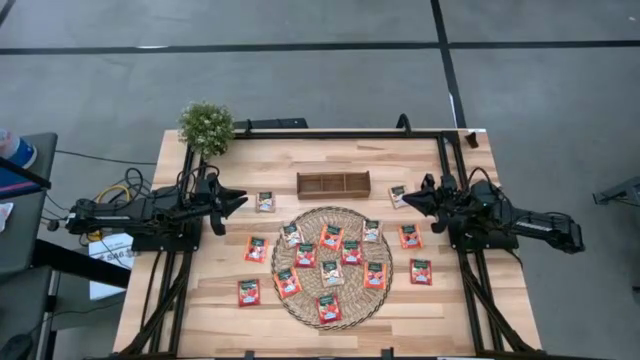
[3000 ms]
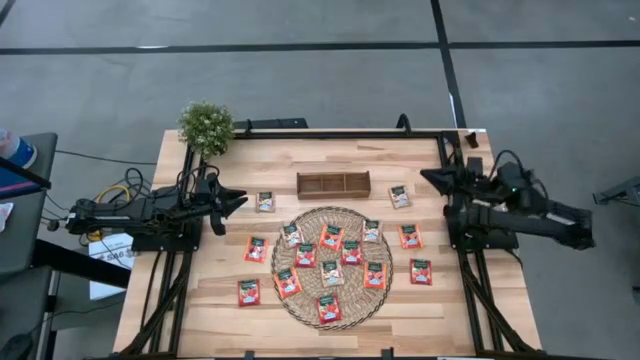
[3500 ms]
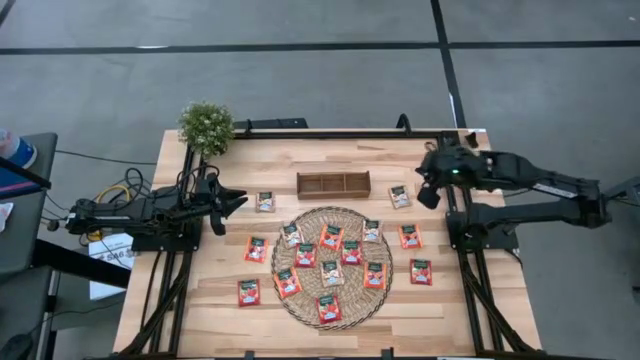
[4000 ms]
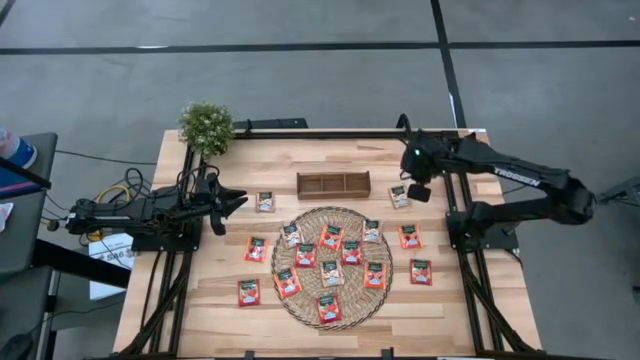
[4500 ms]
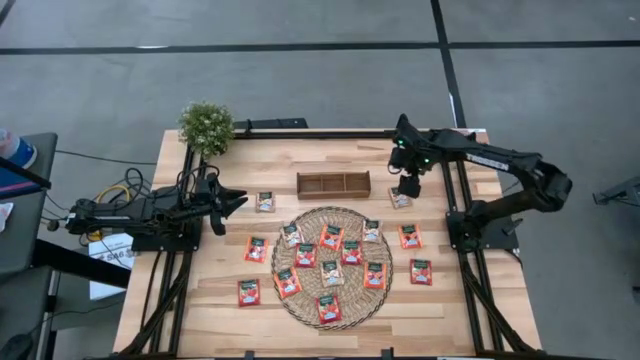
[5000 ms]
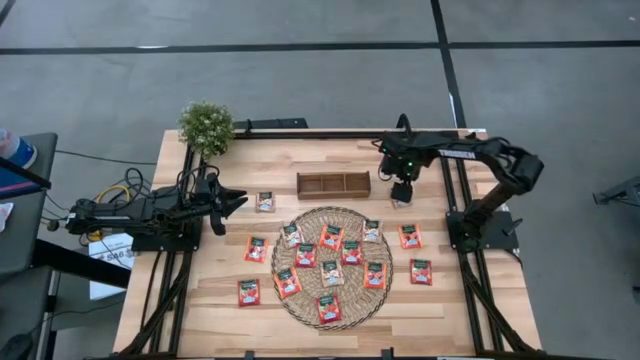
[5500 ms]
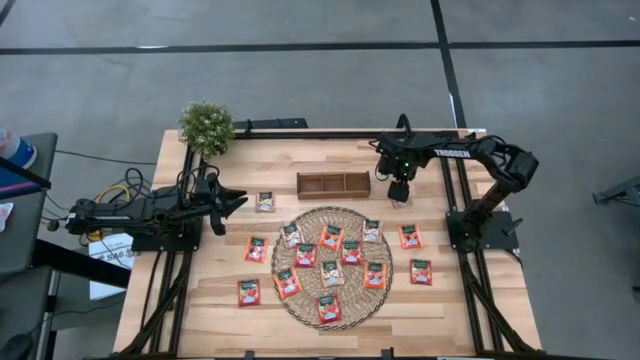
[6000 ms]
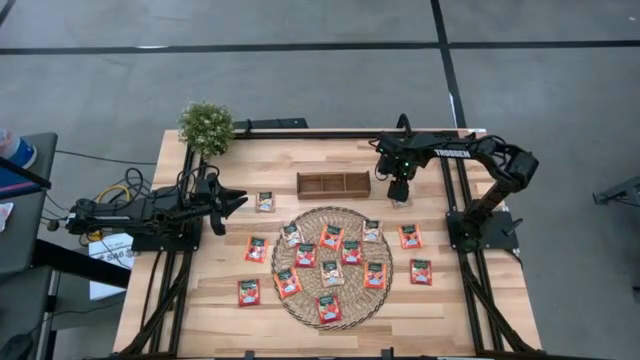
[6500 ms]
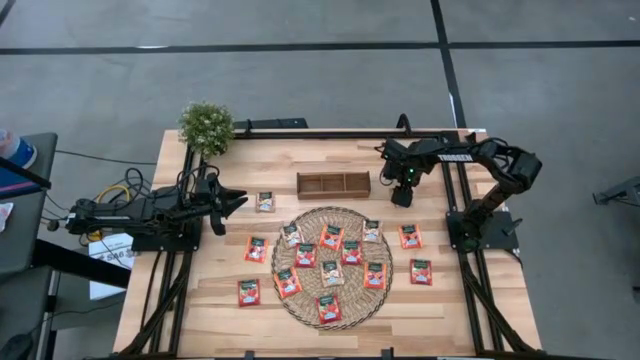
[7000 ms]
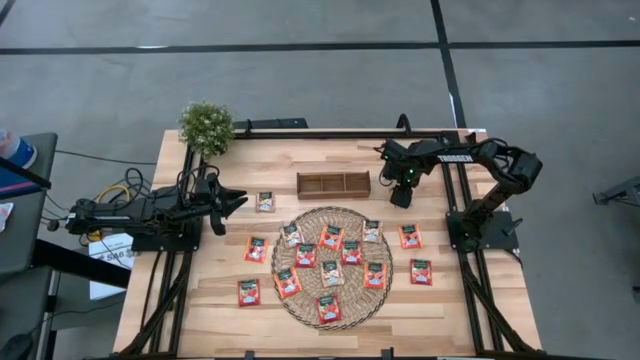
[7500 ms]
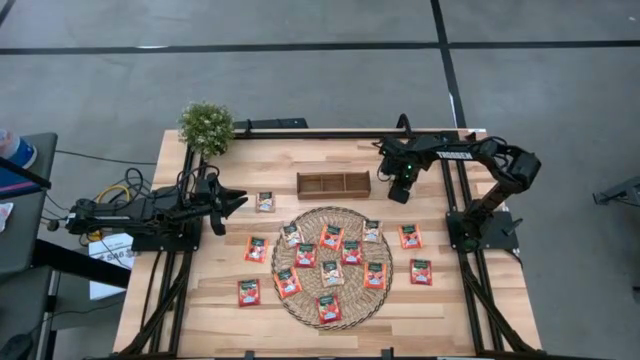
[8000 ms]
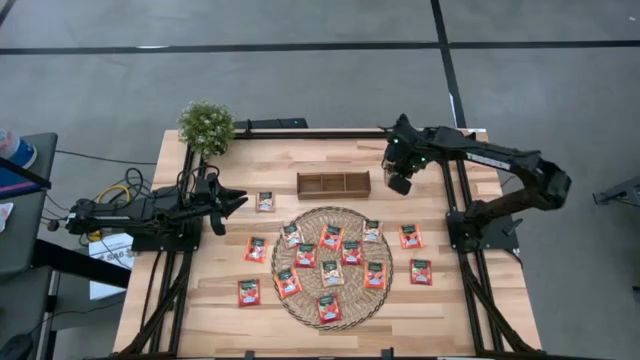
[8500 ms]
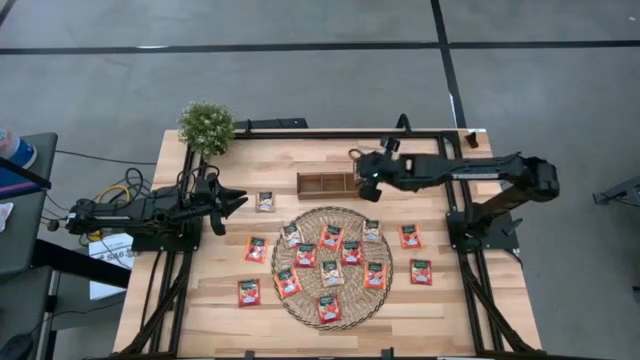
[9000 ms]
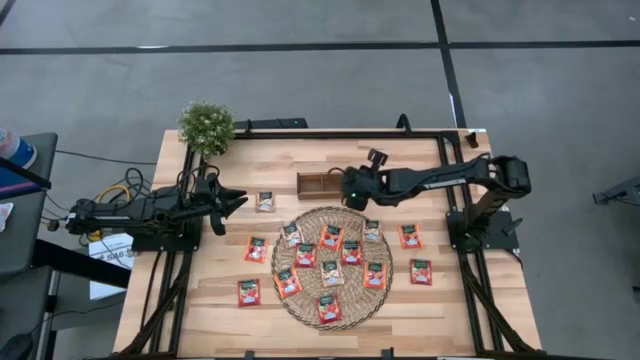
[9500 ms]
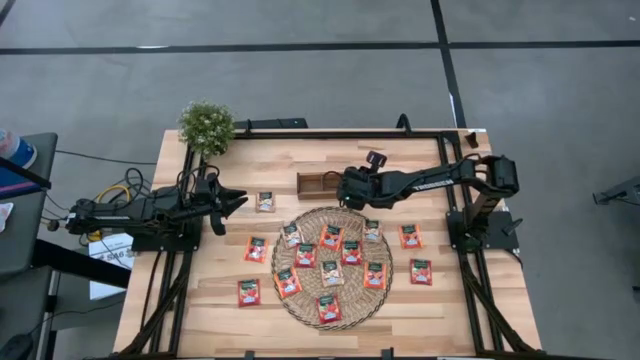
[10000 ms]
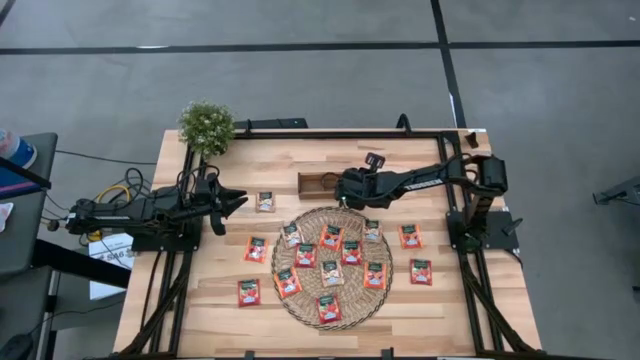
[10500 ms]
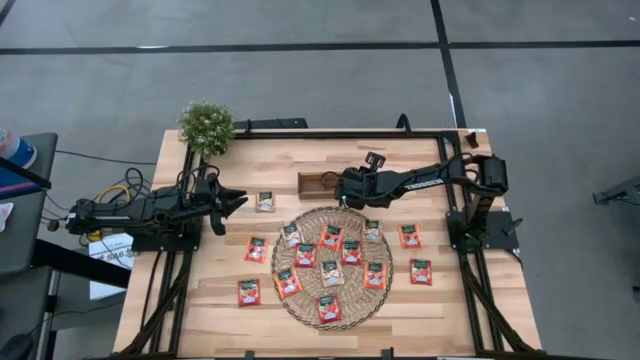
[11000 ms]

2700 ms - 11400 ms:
Task: Pick & Place Tea
Put the gold tea bag into the wooden organizer

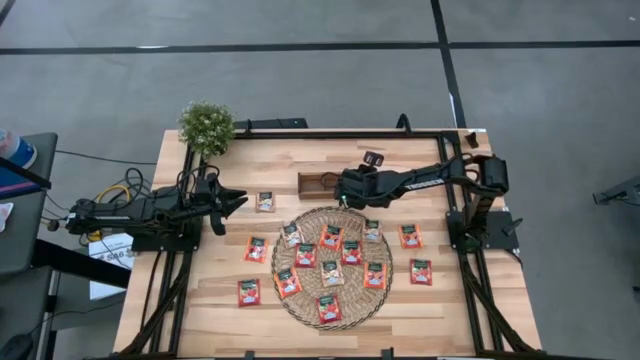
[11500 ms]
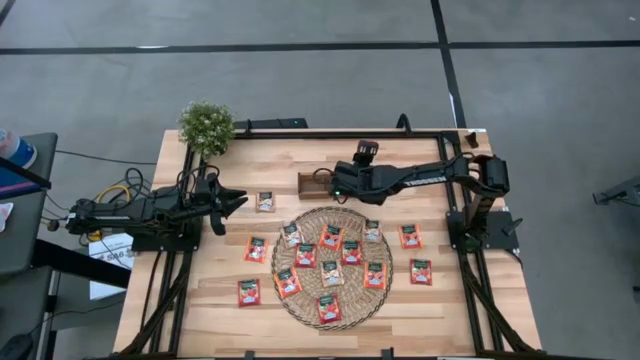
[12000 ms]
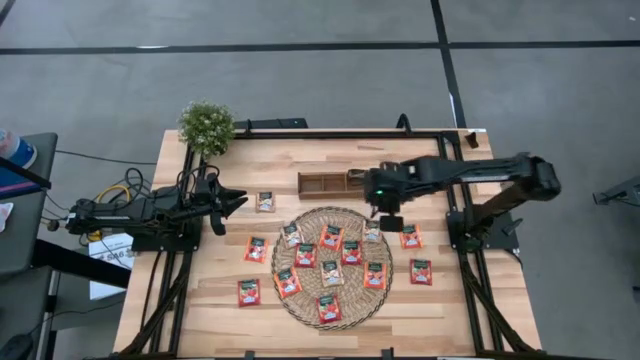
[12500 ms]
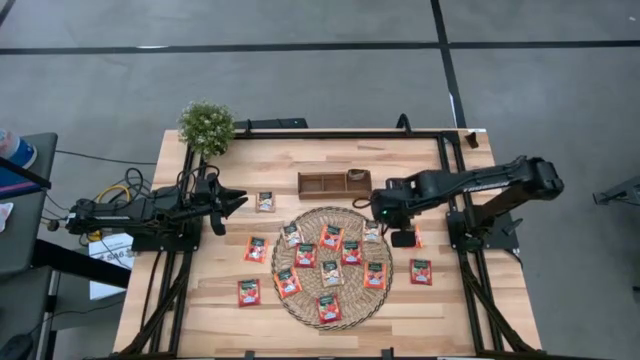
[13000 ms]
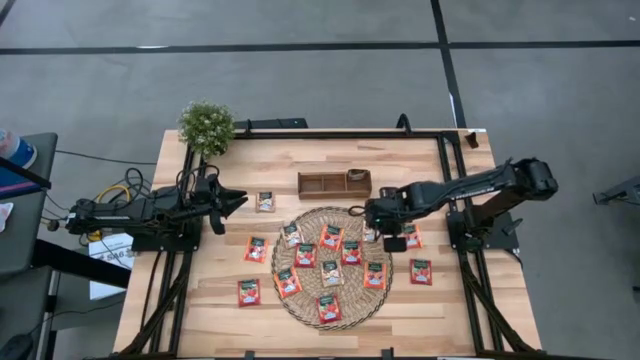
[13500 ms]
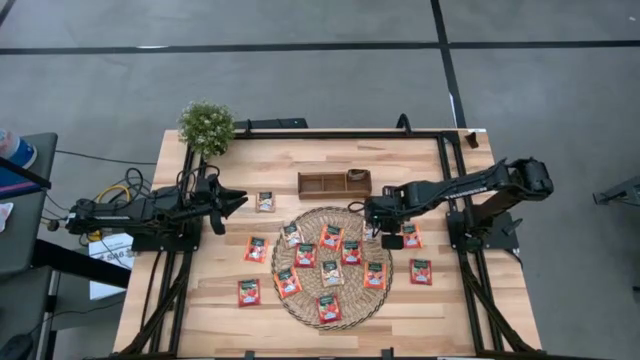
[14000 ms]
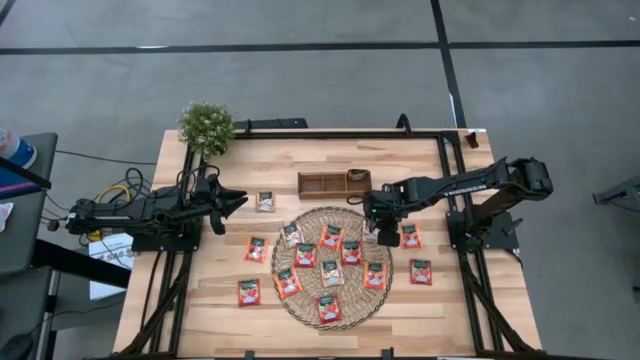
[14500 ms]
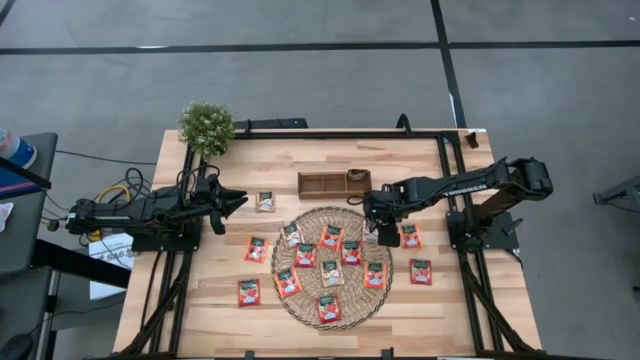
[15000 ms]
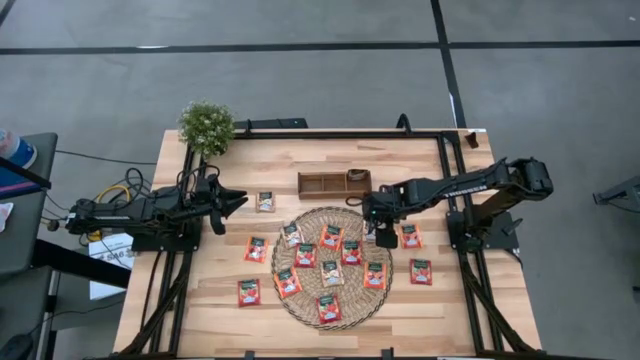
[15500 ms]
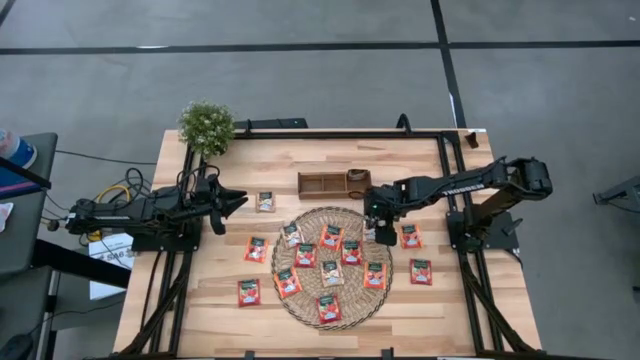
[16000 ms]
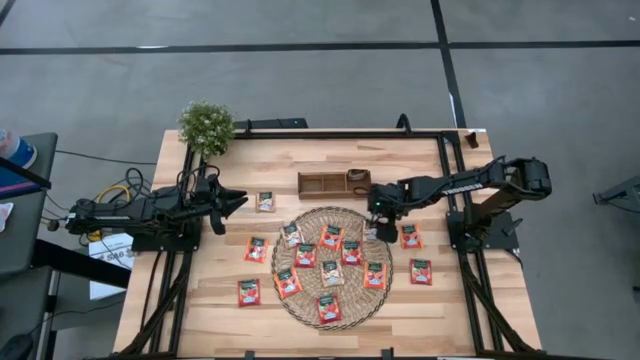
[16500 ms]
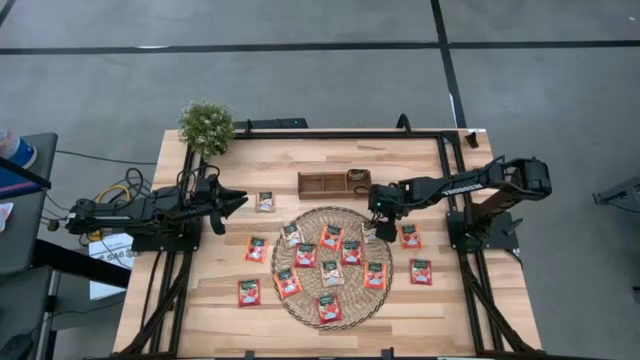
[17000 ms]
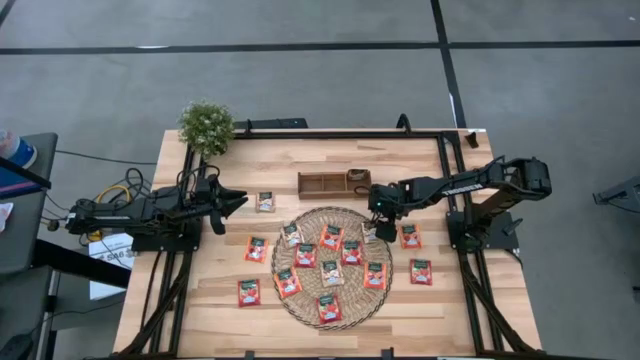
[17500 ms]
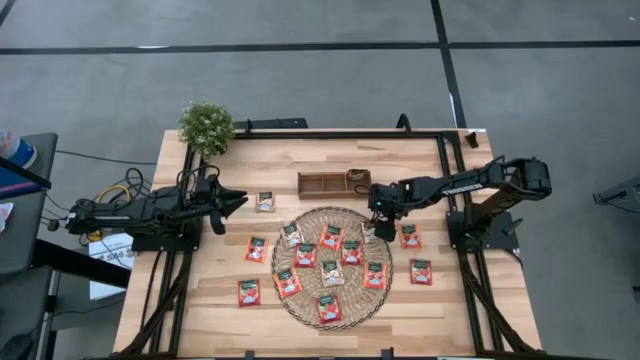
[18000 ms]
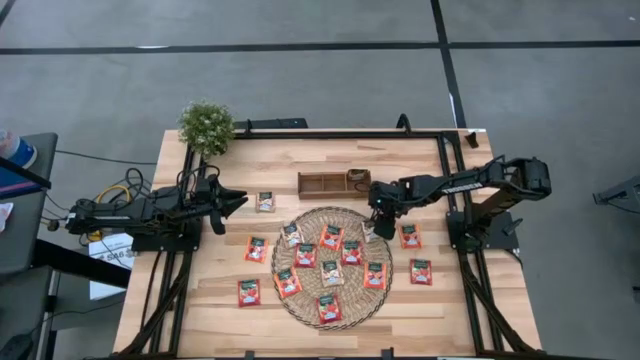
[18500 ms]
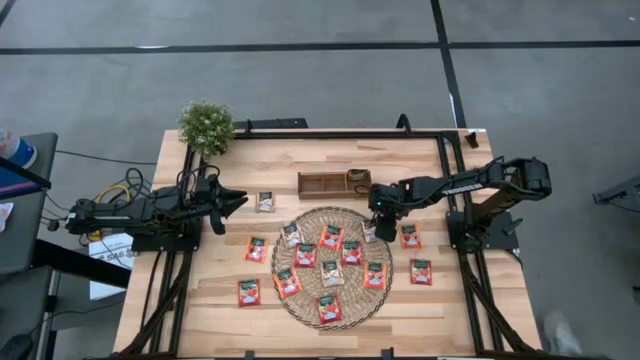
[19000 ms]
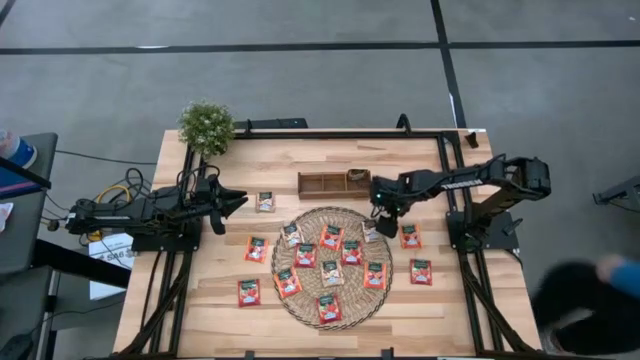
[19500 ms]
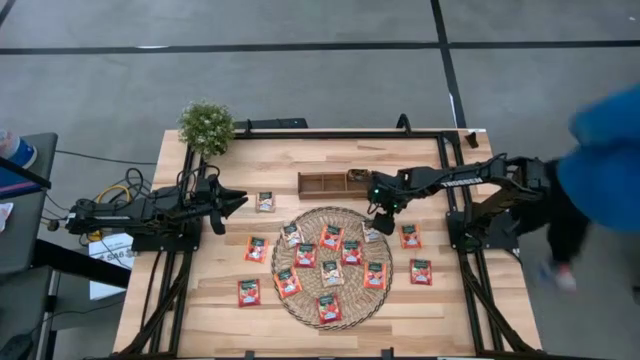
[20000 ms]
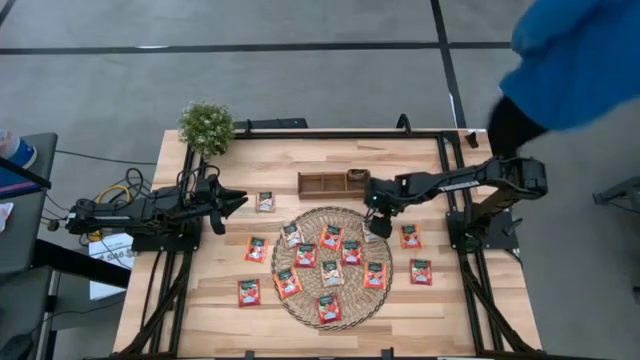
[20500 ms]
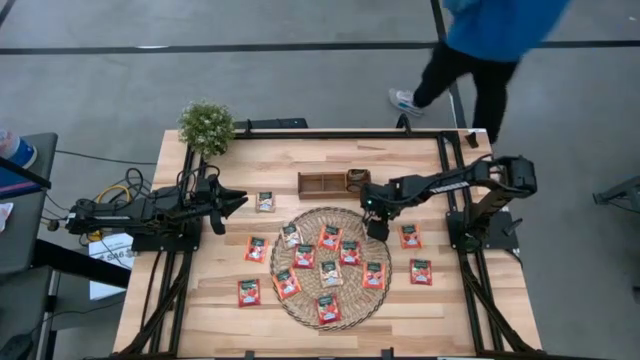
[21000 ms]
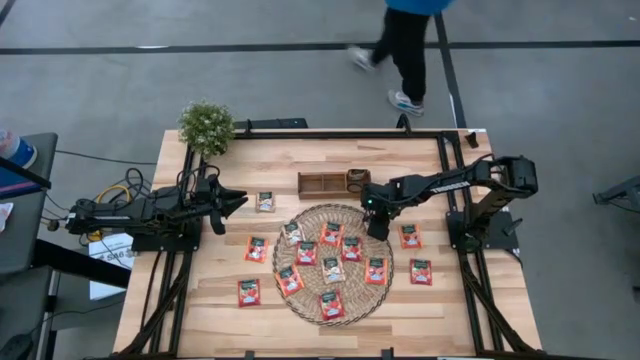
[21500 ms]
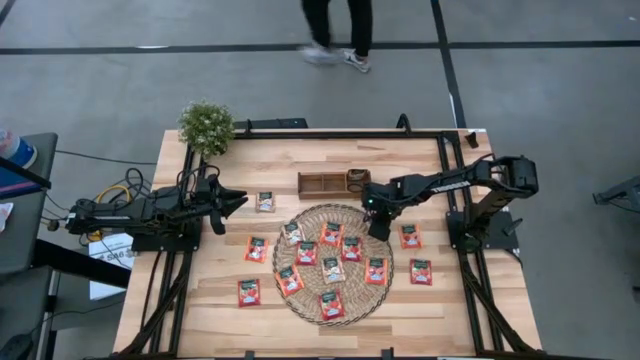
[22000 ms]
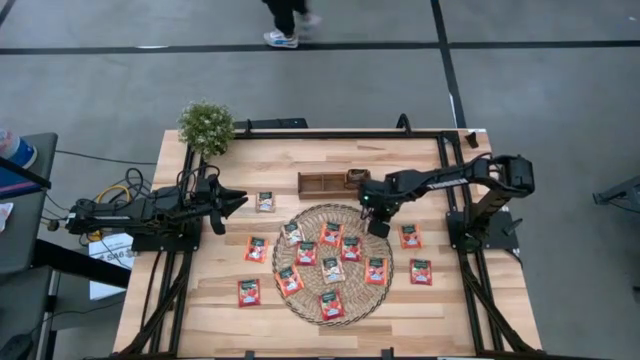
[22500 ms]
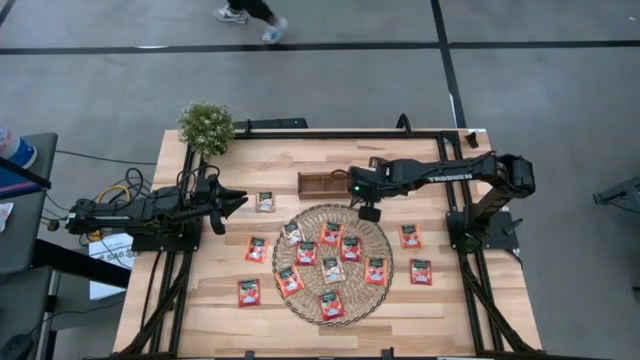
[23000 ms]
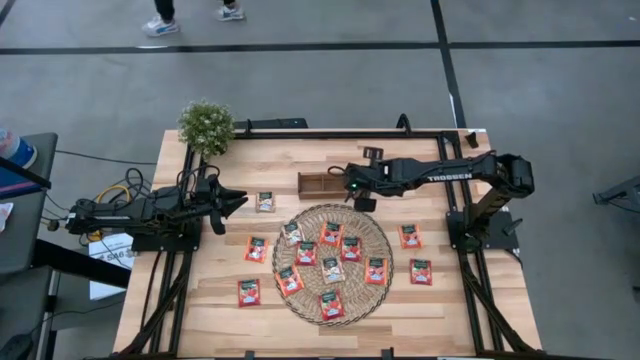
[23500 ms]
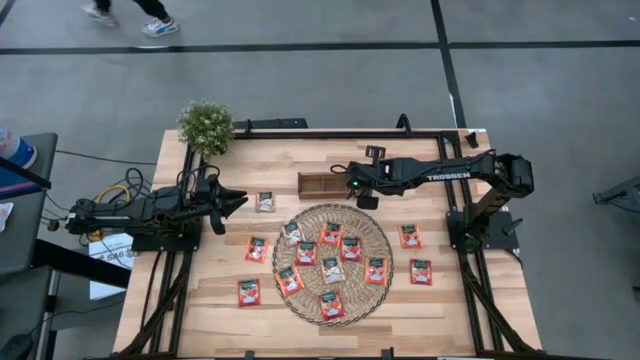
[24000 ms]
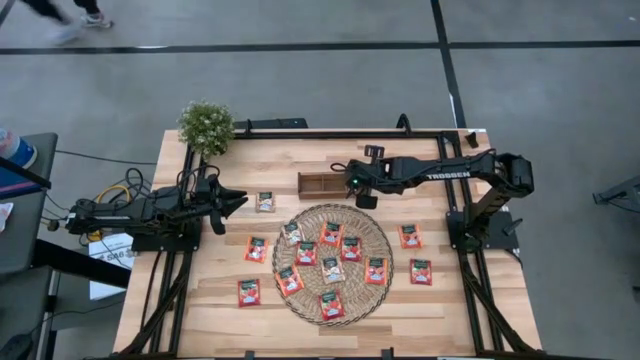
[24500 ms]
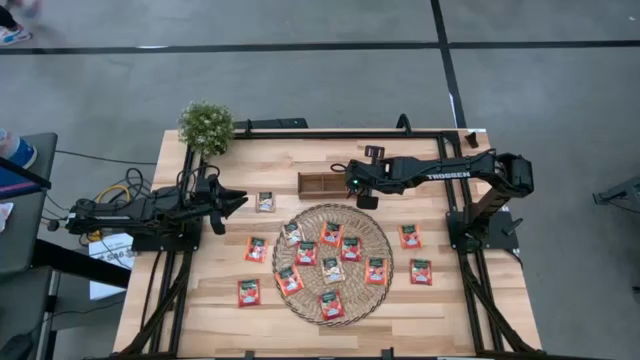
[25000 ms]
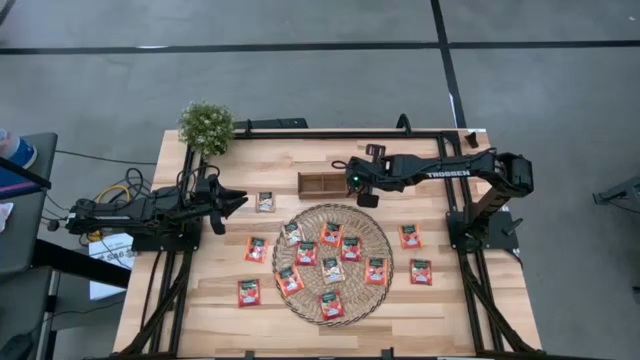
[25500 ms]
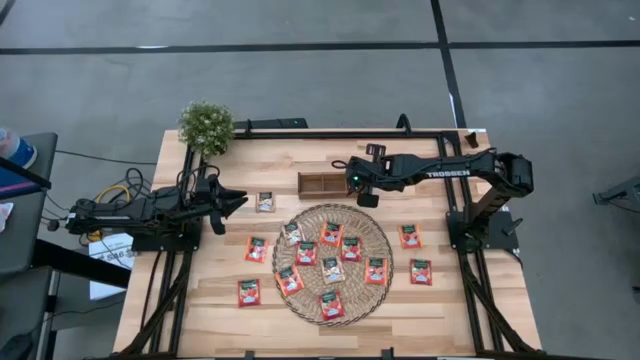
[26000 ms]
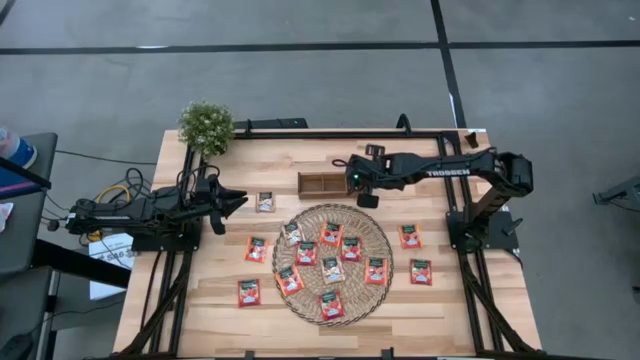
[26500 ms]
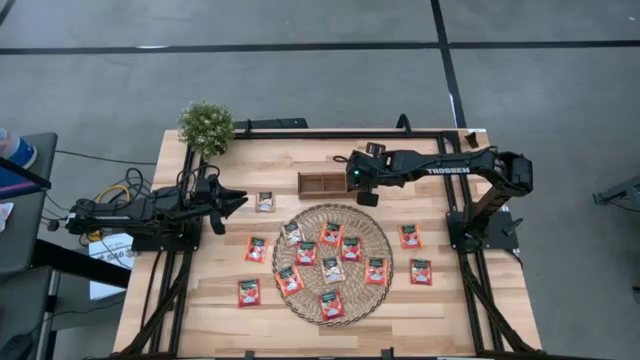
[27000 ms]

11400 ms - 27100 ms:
Put the gold tea bag into the wooden organizer
